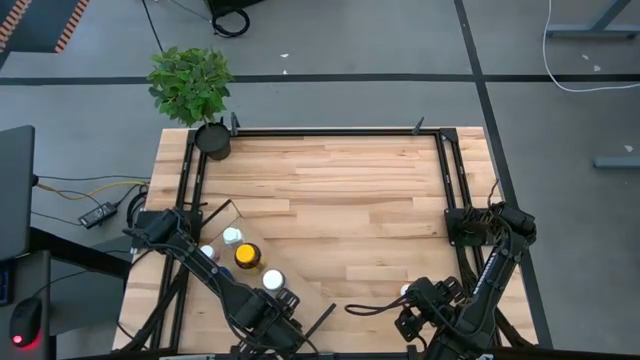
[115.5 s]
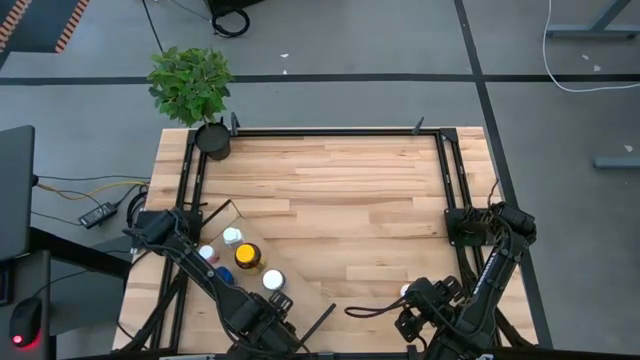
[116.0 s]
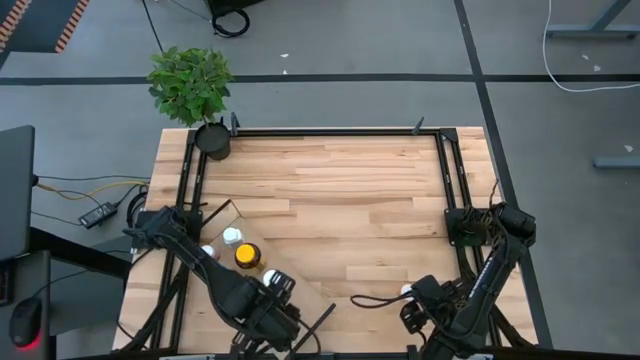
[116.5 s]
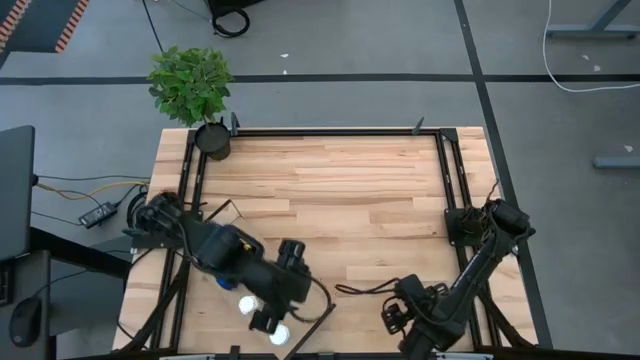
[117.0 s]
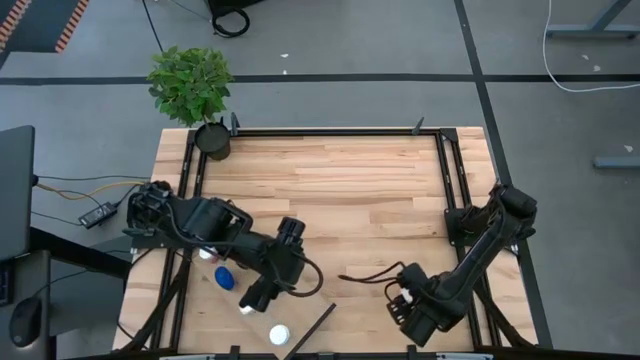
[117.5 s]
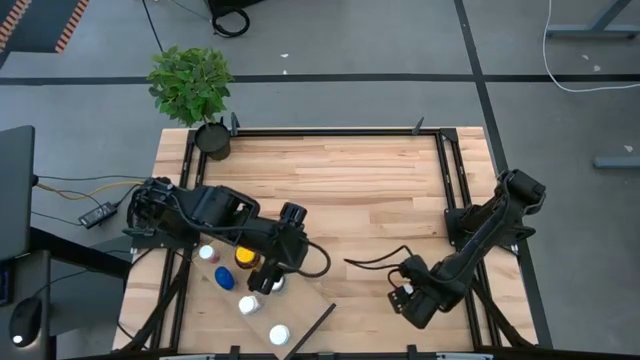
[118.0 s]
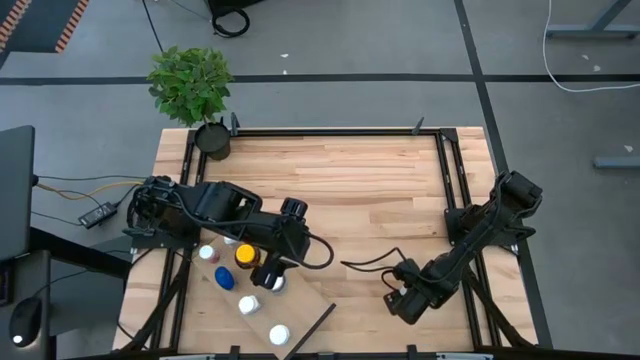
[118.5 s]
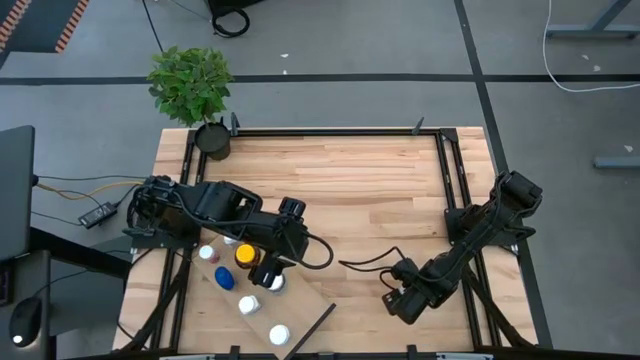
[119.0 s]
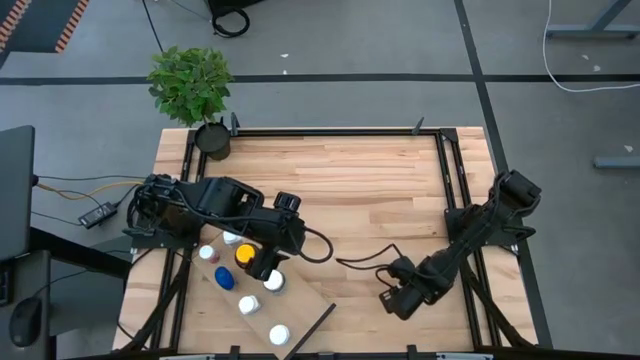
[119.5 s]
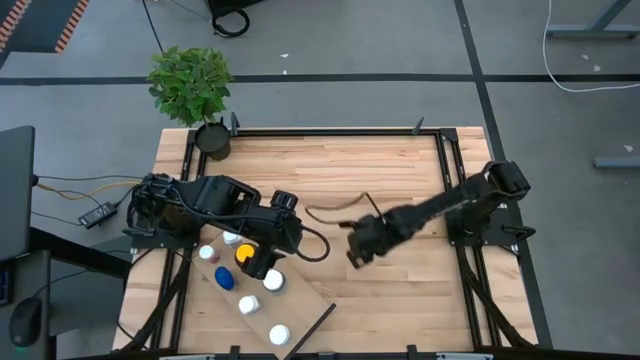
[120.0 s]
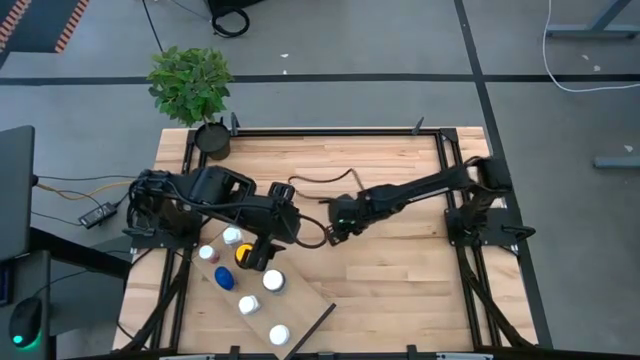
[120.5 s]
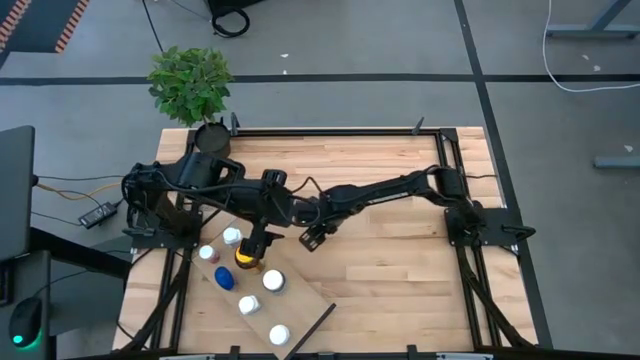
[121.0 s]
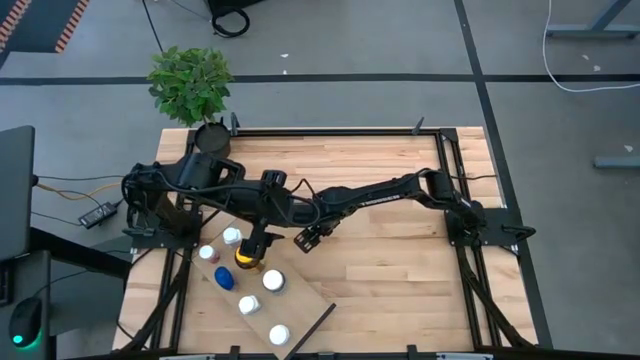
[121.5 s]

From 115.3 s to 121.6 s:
Task: Pick and place medicine bottles onto shelf by color
Move the orange pill bottle to the middle of the table

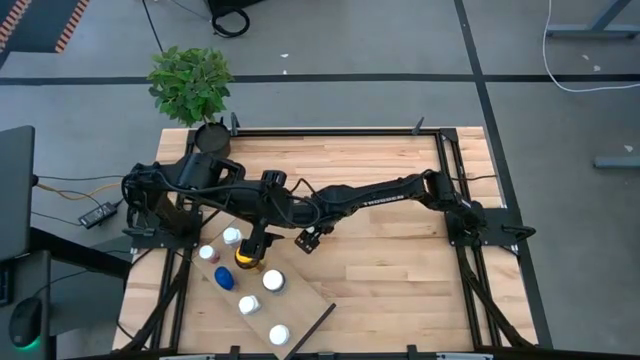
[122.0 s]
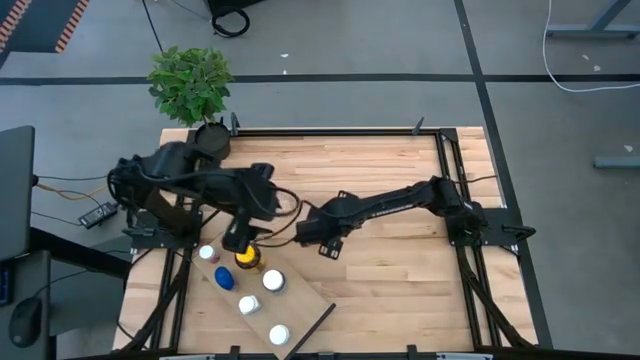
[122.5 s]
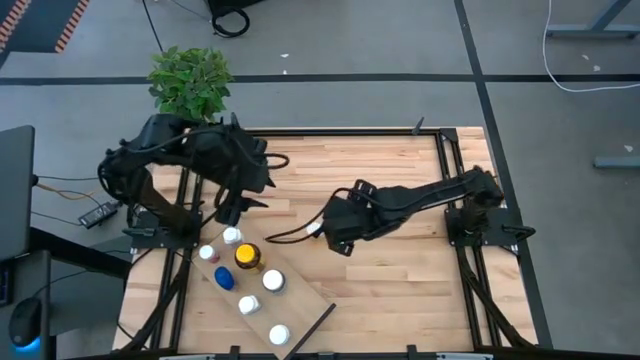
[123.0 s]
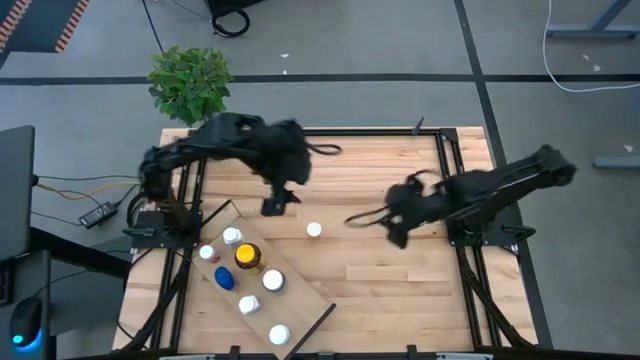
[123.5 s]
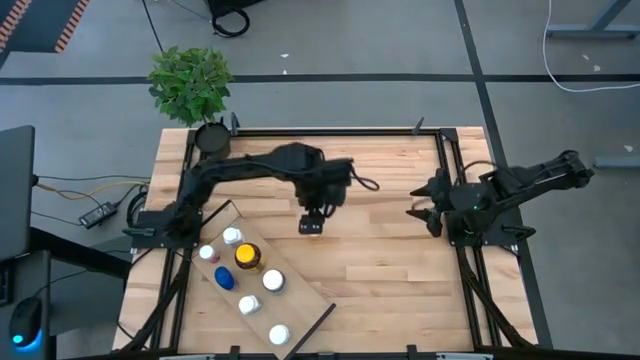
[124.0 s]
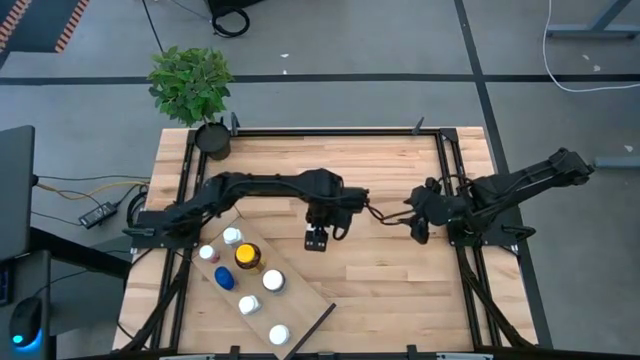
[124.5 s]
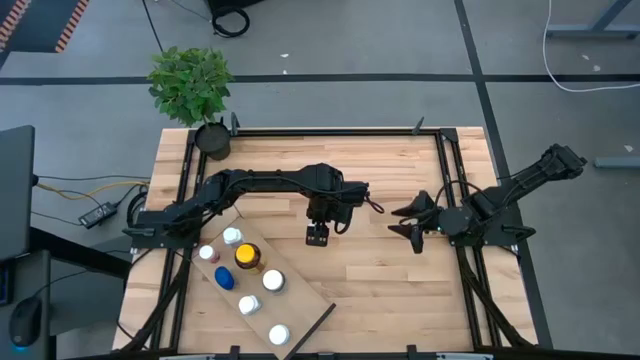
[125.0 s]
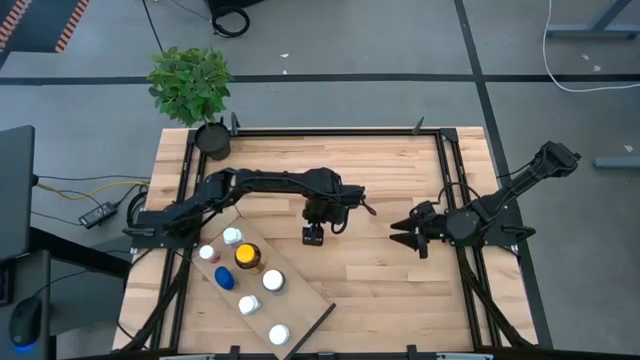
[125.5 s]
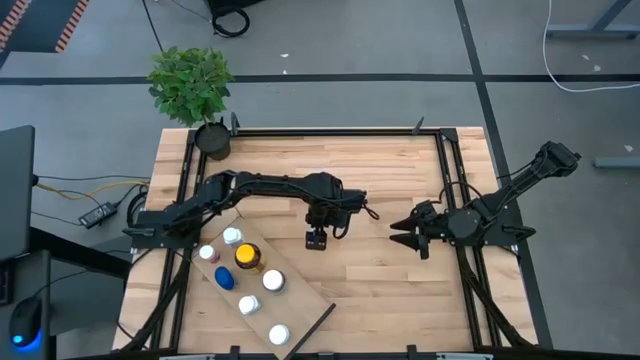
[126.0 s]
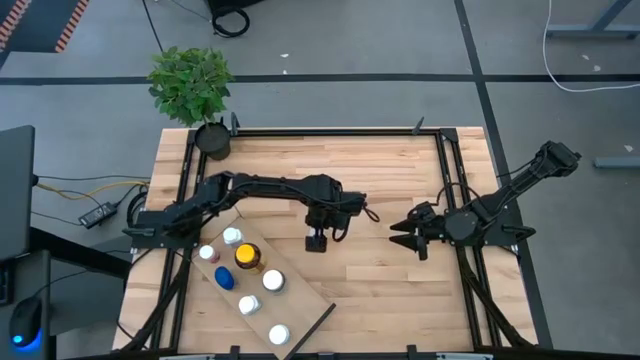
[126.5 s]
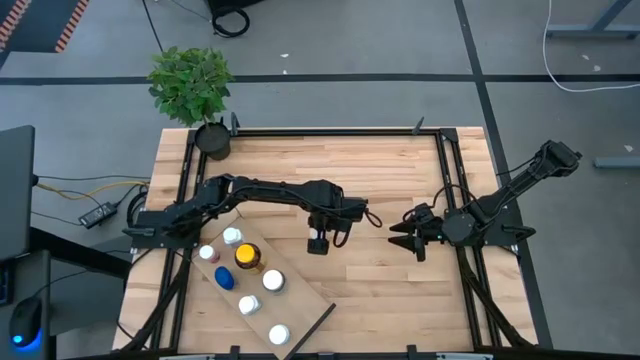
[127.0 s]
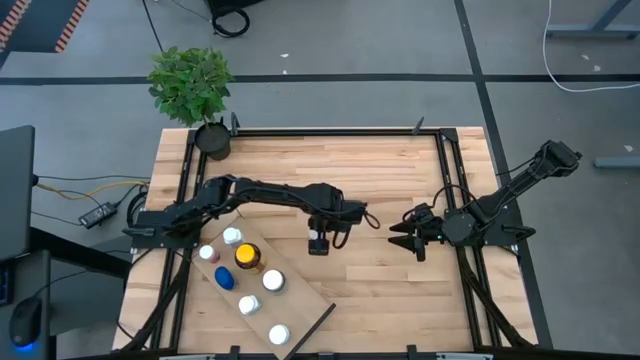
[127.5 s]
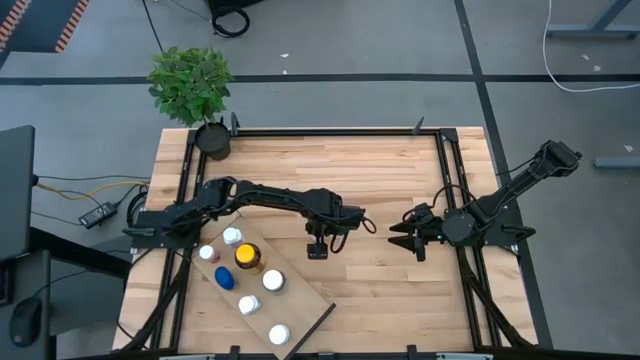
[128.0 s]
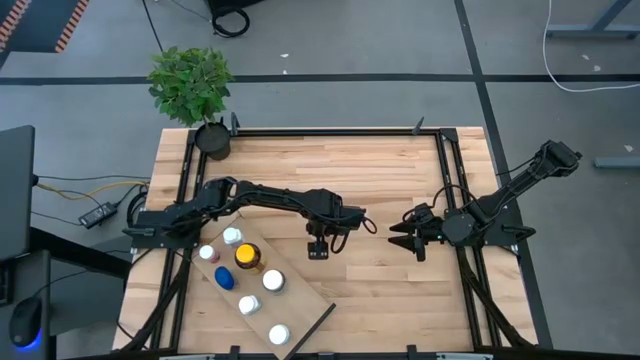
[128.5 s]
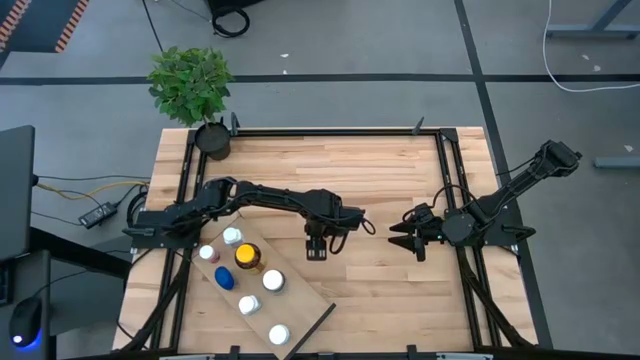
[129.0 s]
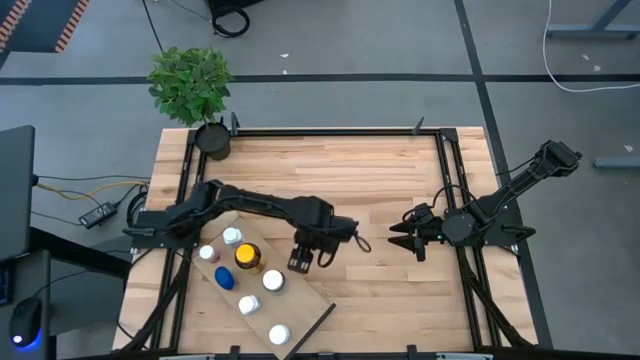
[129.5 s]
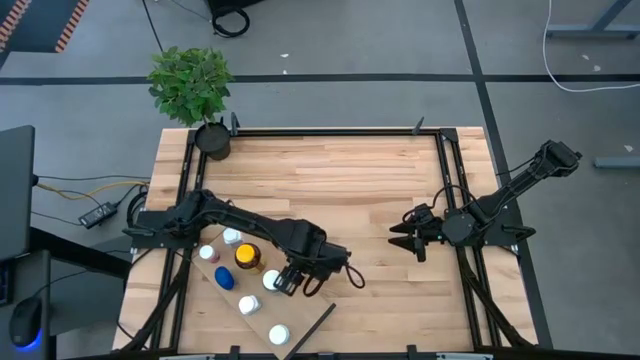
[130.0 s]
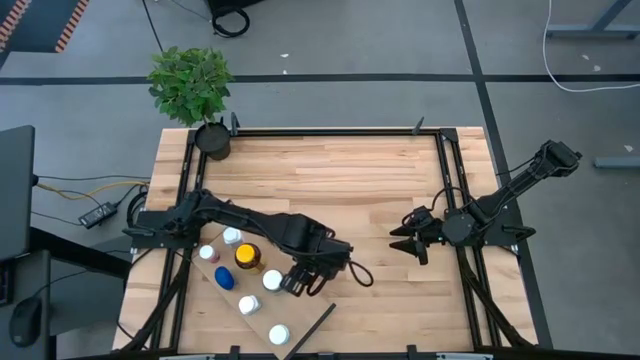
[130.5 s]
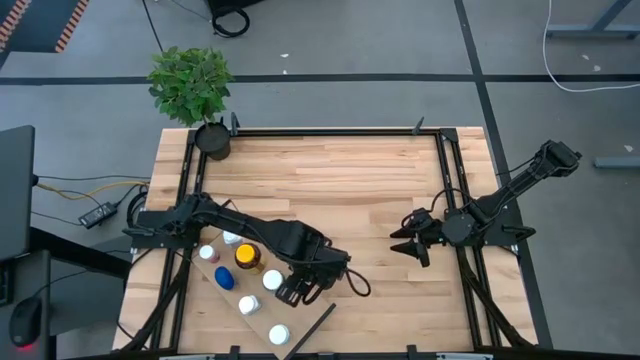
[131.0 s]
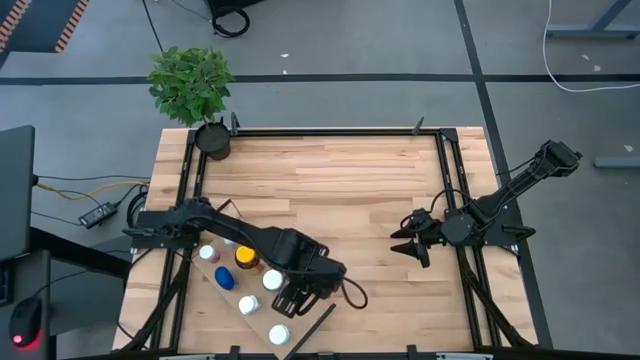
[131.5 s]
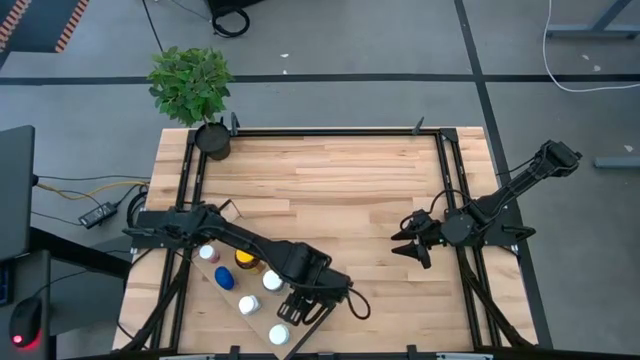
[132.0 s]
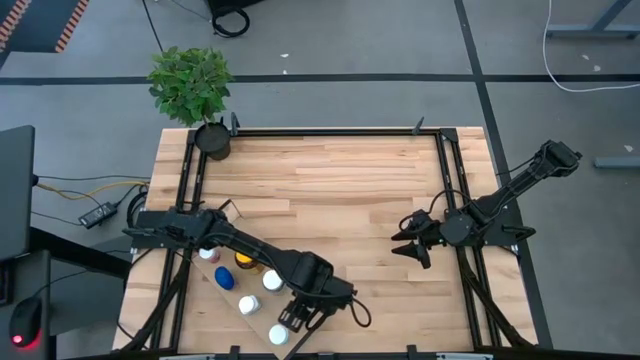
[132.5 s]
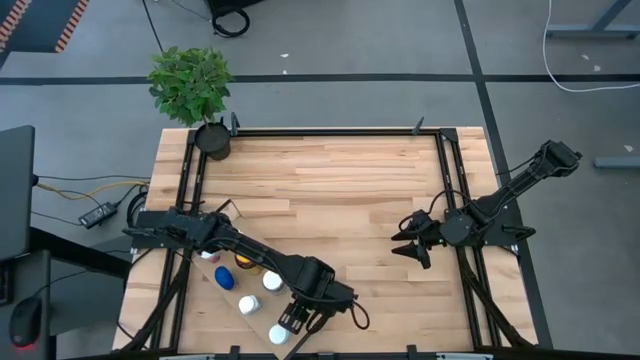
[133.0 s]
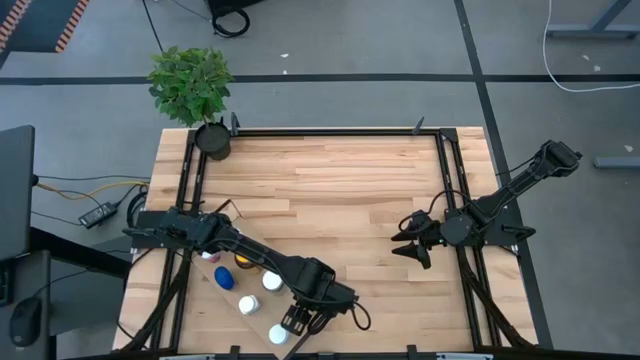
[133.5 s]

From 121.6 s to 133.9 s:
Put the orange pill bottle on the shelf

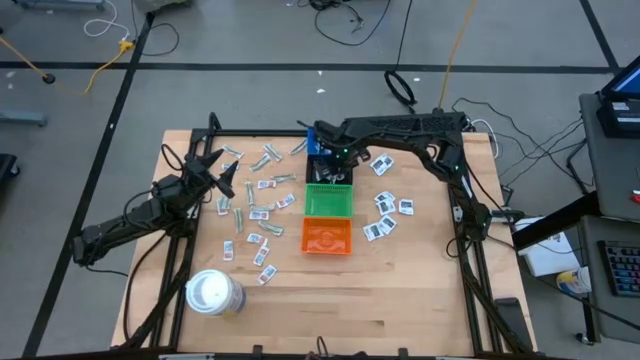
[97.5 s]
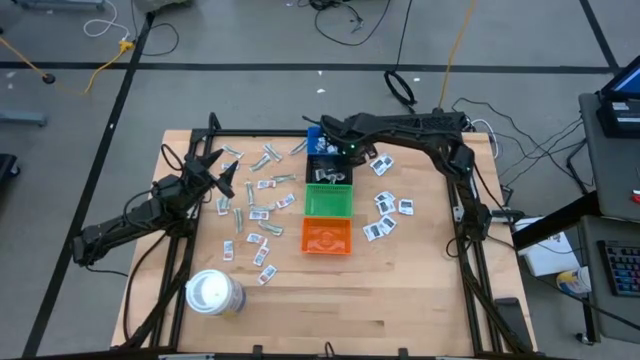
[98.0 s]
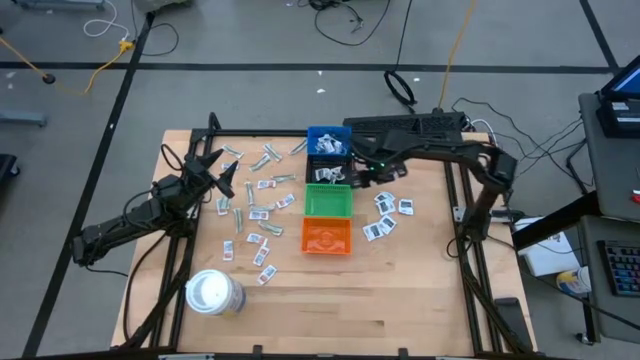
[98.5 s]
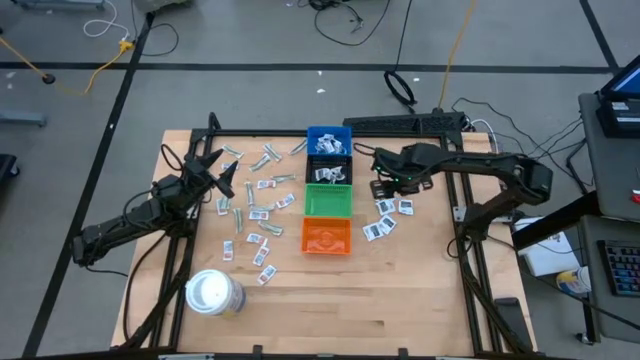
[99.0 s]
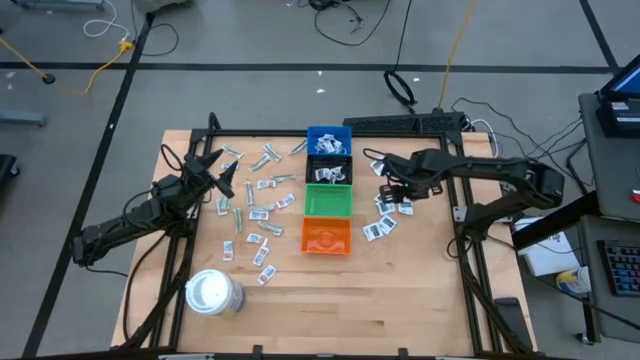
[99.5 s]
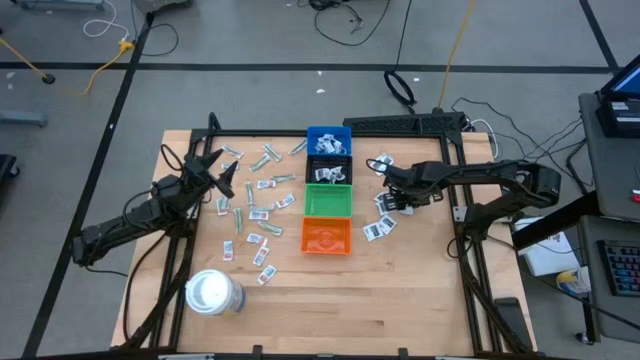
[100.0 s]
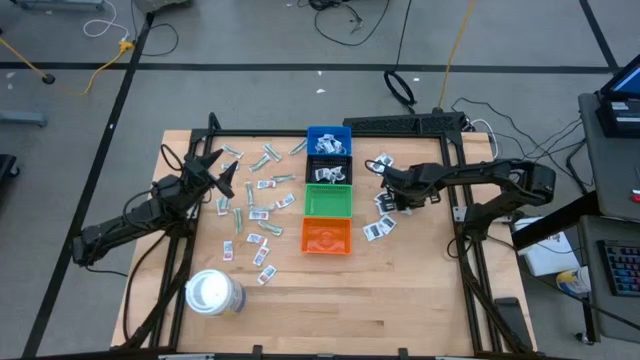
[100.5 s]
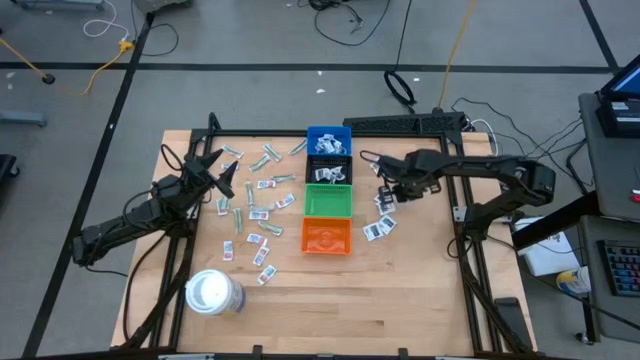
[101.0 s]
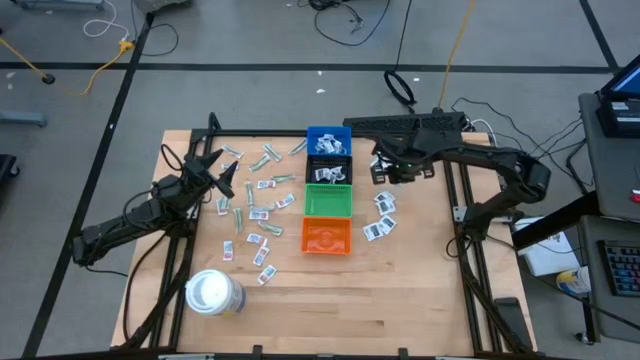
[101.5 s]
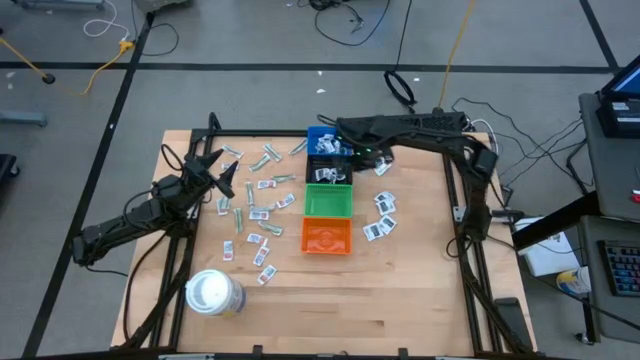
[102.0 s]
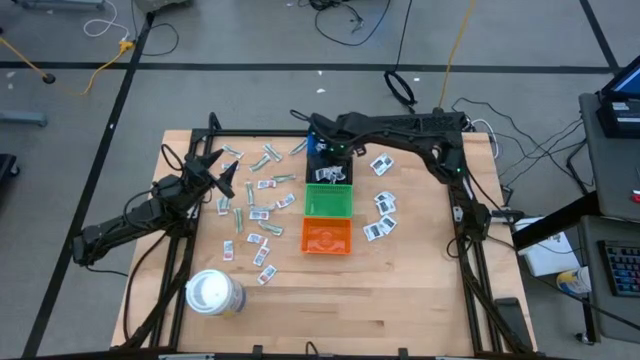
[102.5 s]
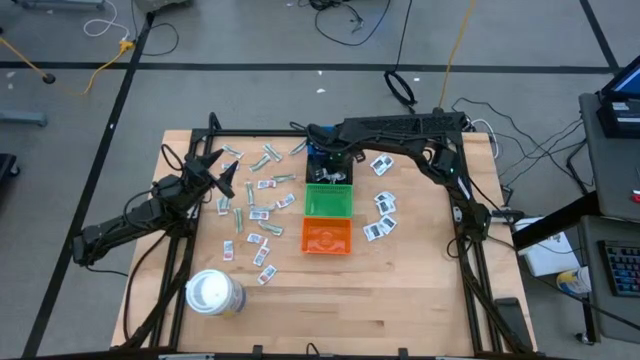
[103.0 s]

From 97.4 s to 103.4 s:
Task: Pick & Place First Aid Supplies
Put the black towelette pack into the black bin
